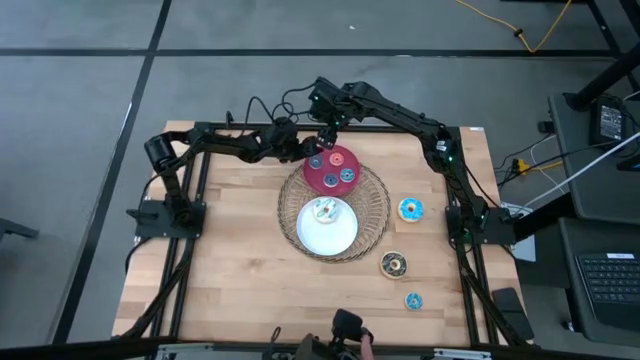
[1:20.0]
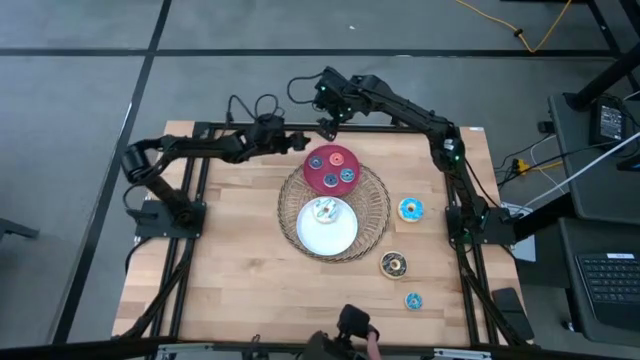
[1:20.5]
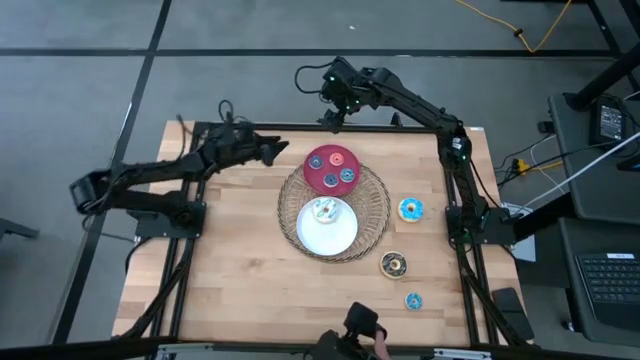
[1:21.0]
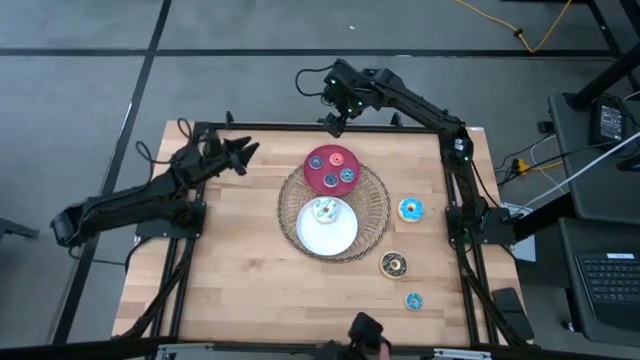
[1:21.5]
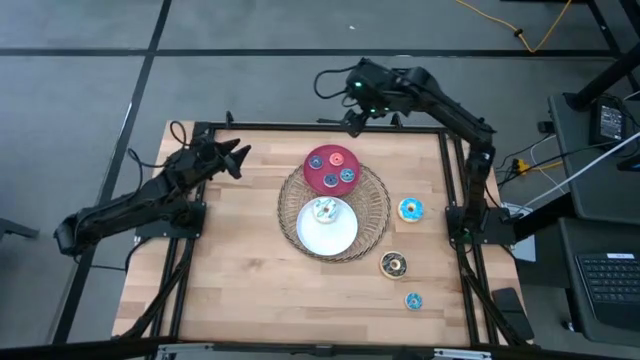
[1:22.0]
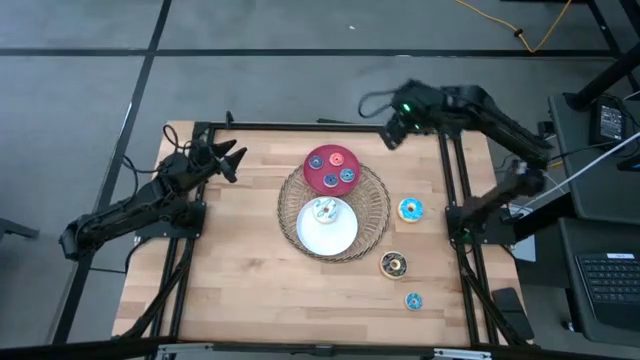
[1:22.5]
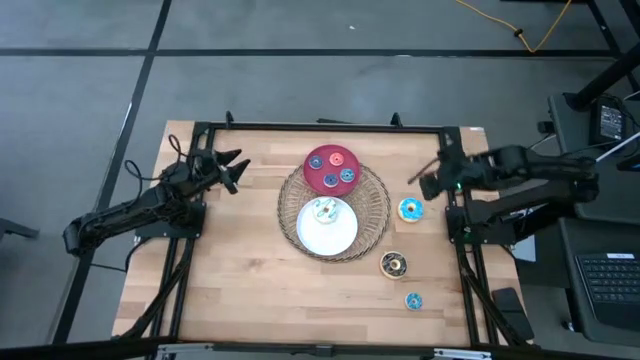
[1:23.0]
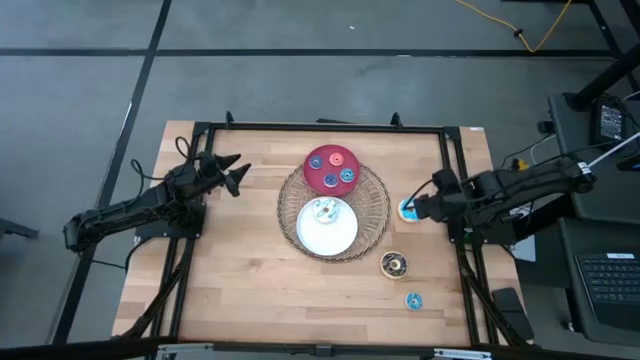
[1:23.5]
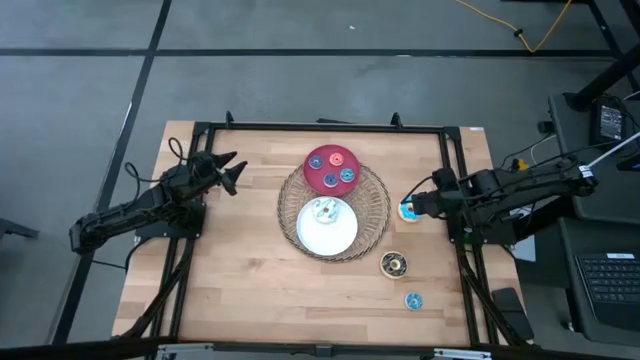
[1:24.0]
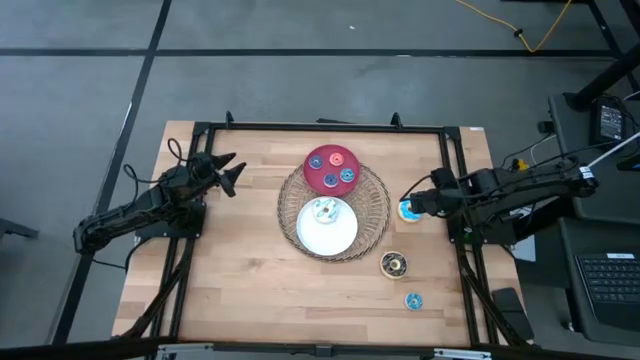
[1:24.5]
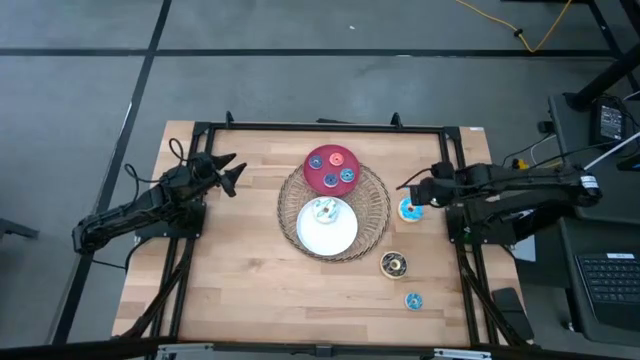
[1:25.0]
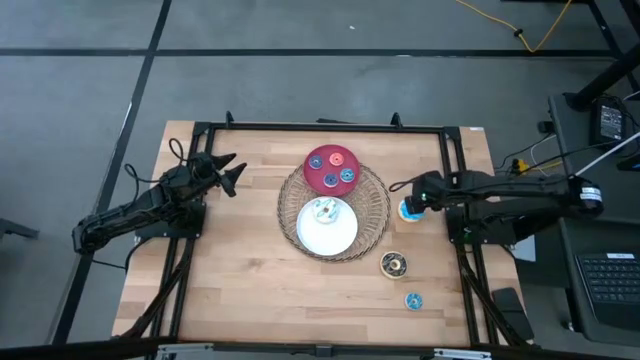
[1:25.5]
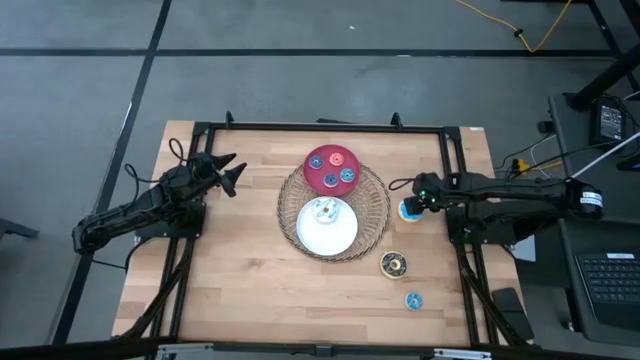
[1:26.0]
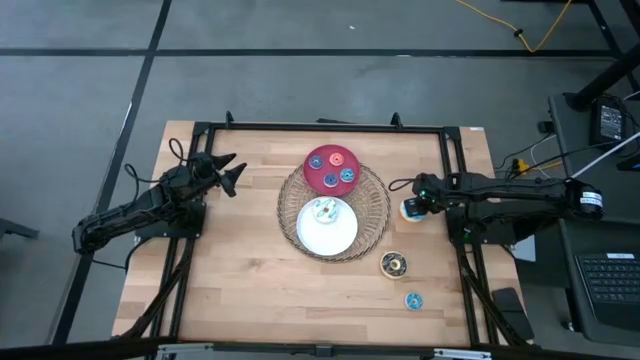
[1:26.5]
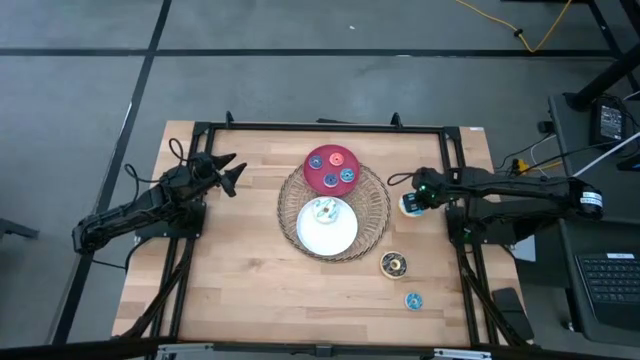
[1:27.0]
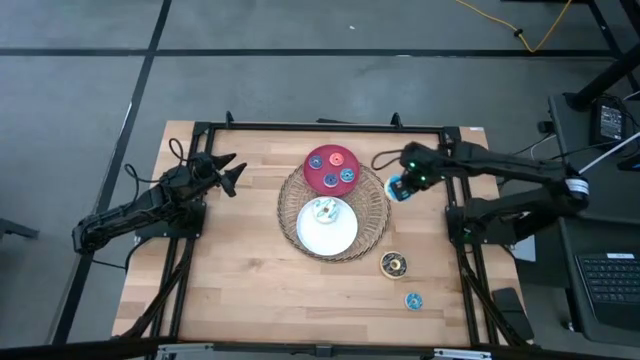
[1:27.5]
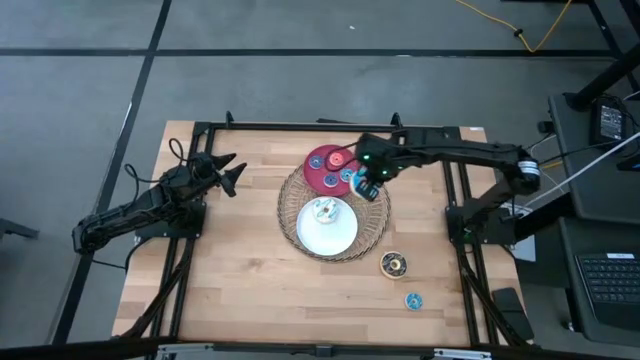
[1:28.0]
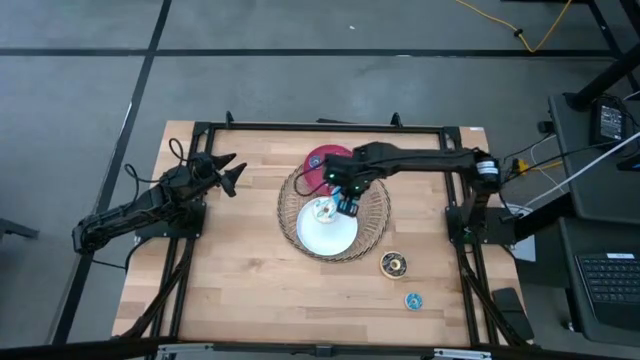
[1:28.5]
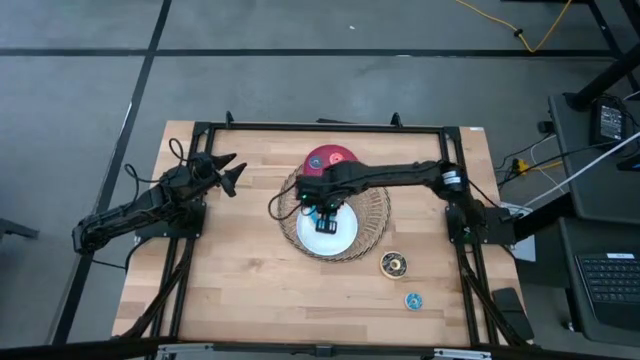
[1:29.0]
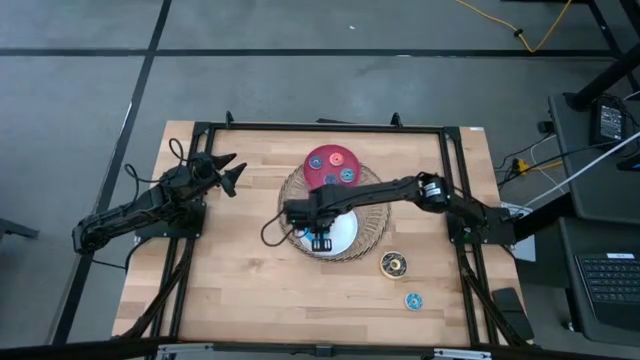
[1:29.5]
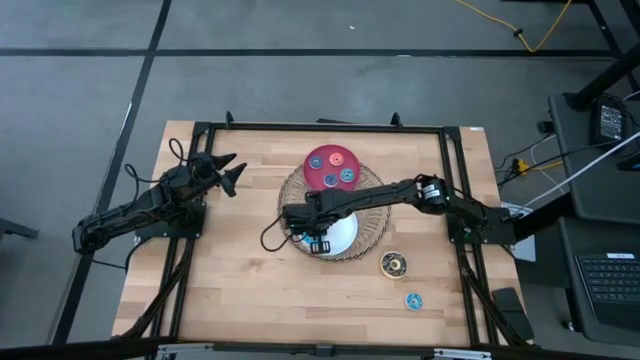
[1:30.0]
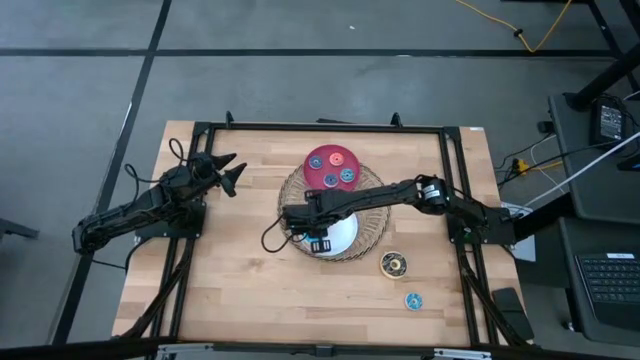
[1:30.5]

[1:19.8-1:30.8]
Task: Pick & Place donuts
Put the large blue donut on the white plate

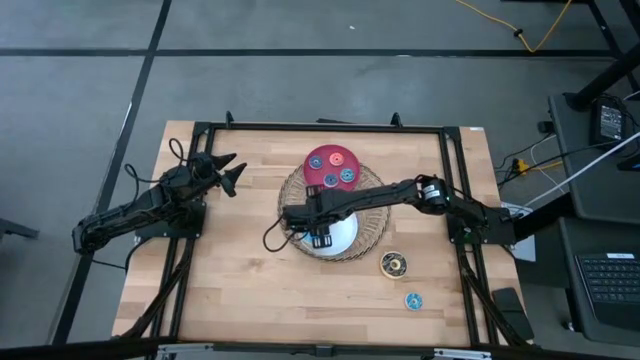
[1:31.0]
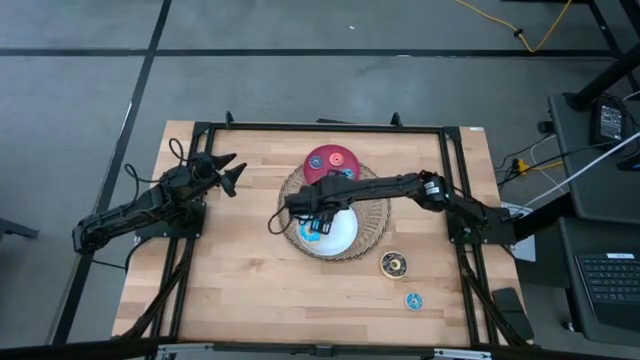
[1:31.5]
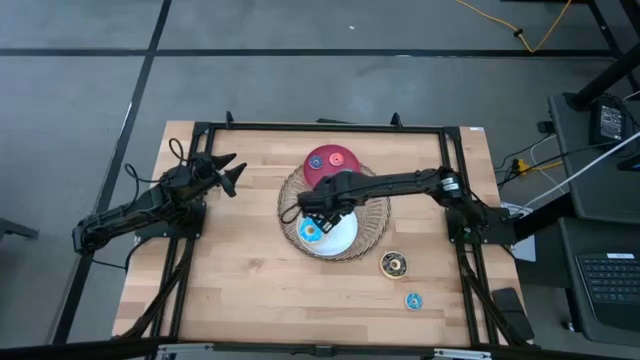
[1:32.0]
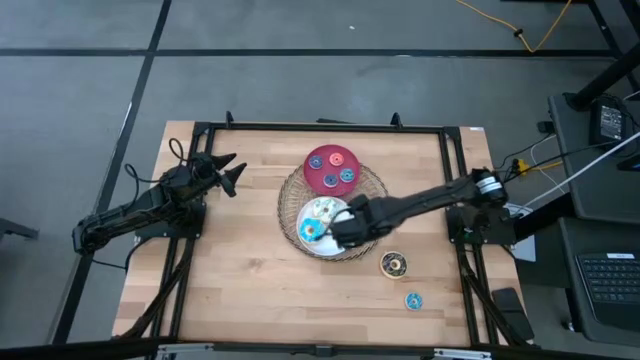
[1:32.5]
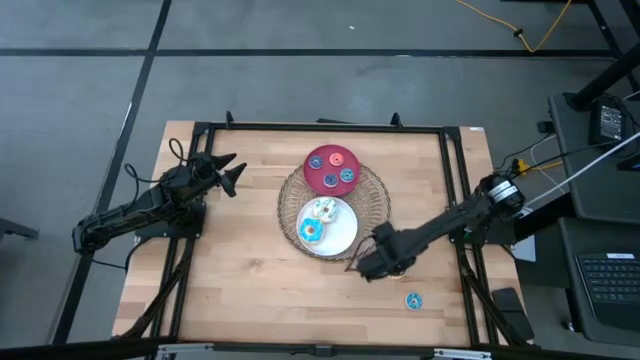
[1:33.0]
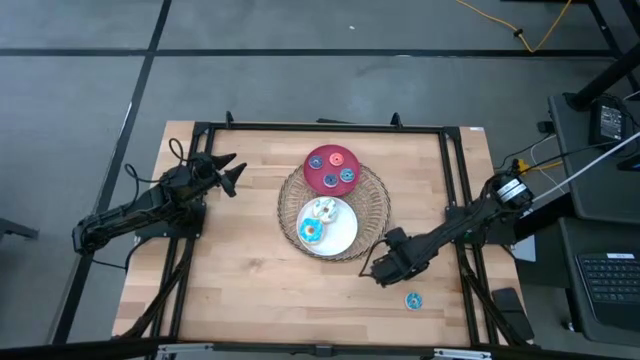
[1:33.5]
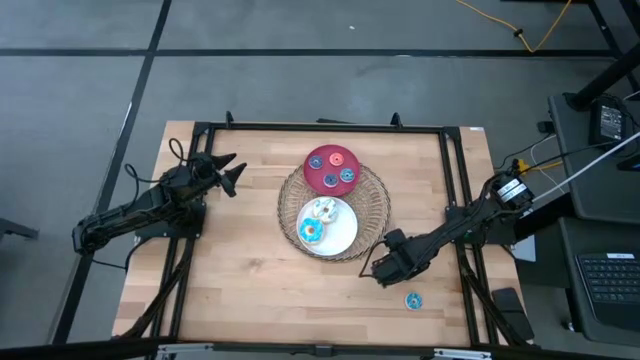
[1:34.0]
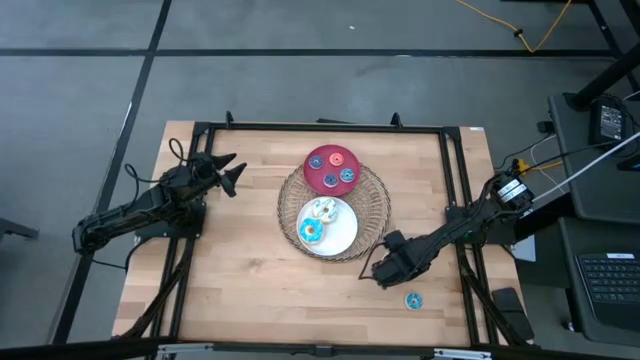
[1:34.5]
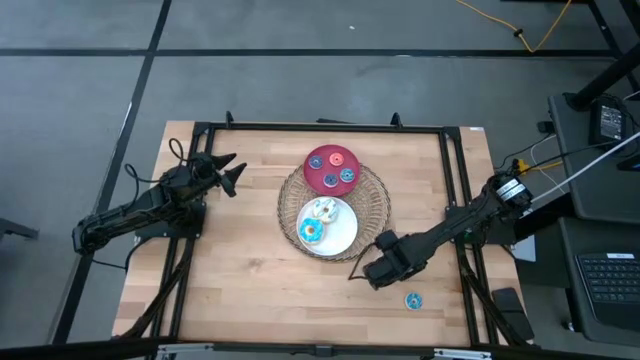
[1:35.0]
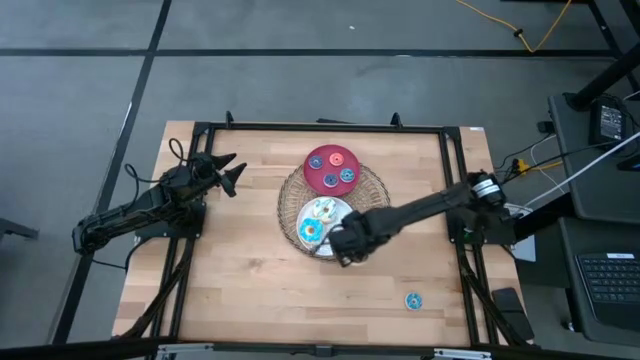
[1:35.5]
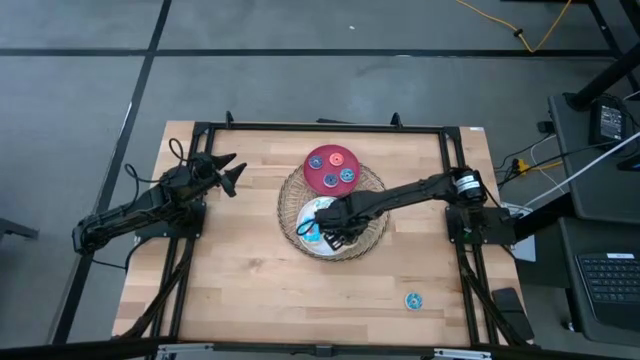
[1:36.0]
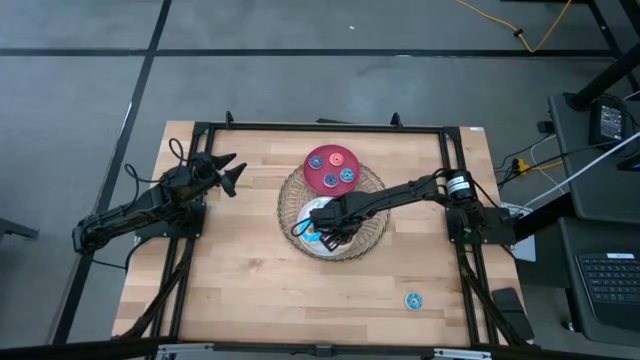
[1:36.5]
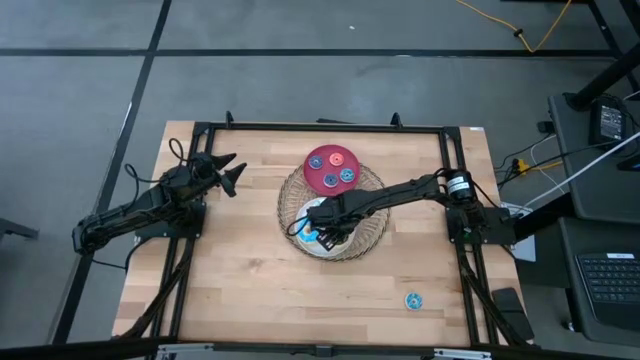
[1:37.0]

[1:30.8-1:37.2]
Put the large black donut on the white plate

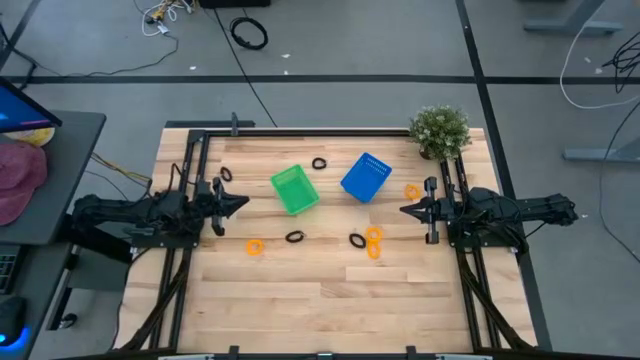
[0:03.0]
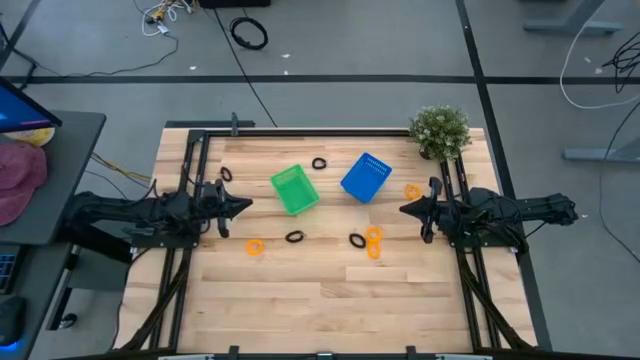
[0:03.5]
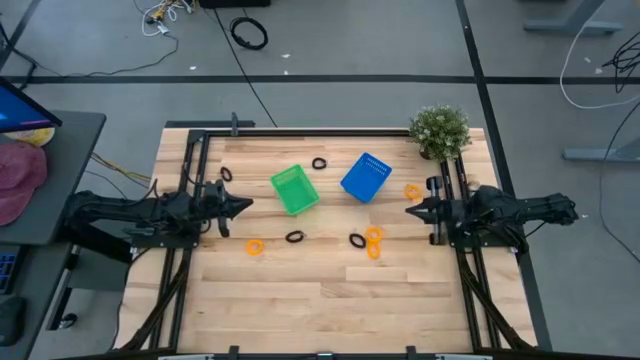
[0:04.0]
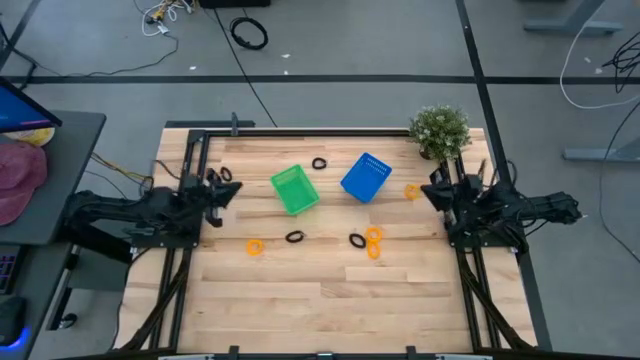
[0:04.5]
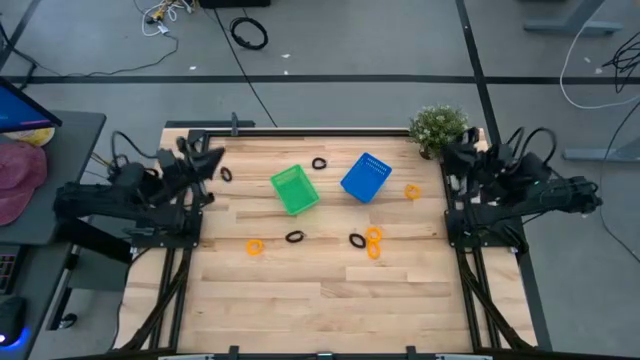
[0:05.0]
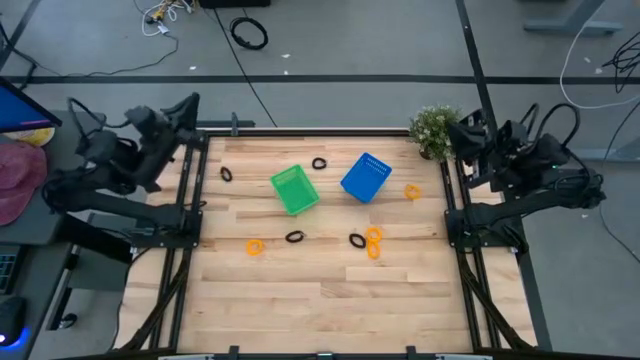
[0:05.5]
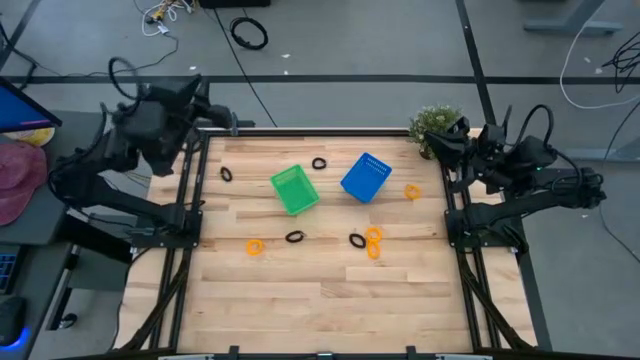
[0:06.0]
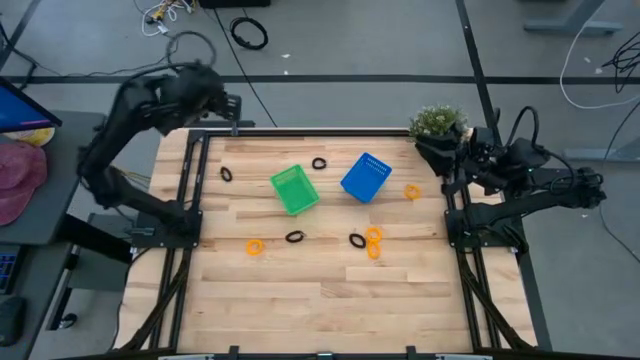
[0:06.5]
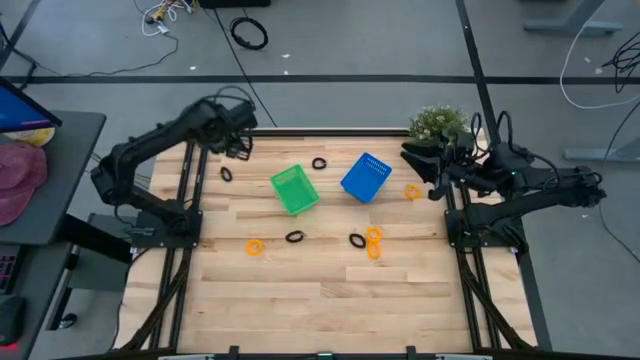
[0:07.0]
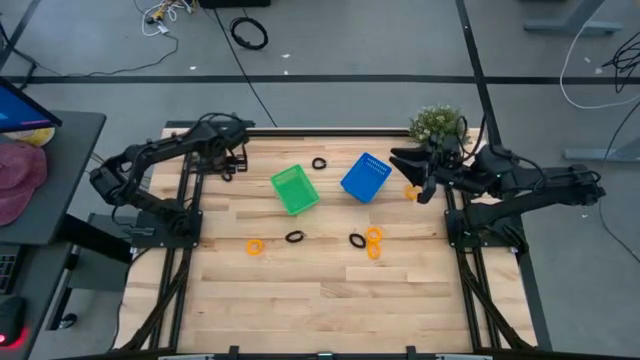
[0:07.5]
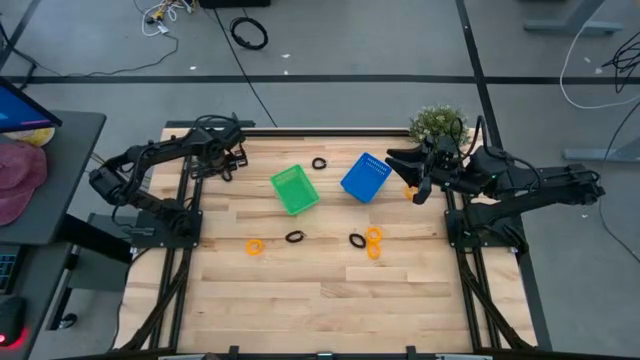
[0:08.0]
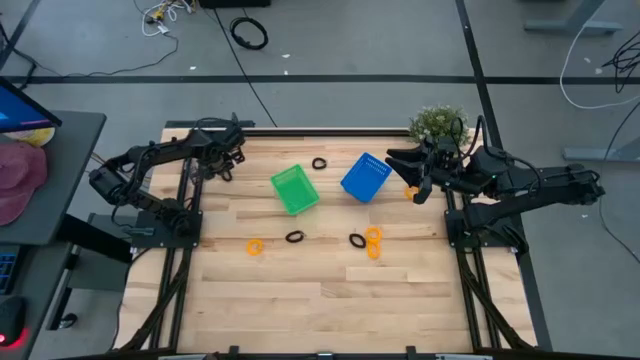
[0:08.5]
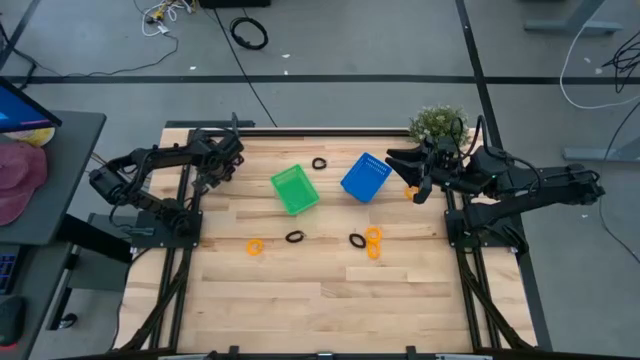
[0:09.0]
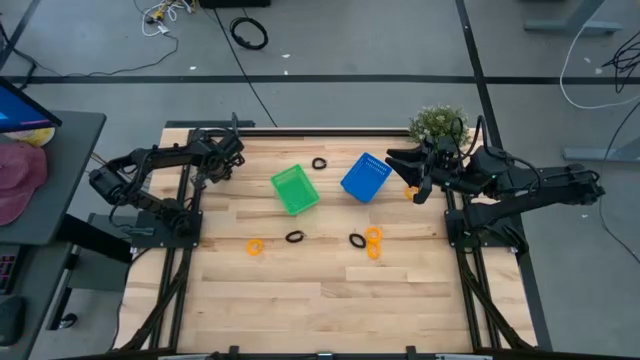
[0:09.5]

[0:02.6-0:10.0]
Task: Sort spring keychains
Put the black spring keychain into the green bin
